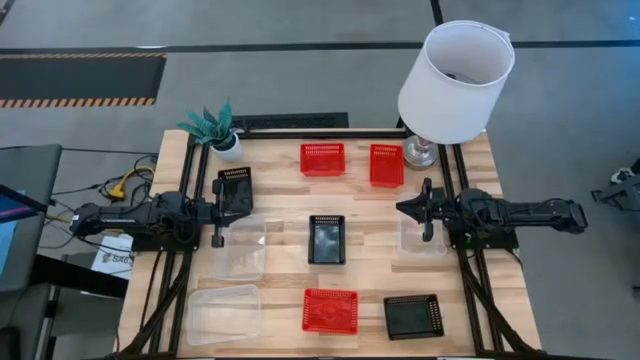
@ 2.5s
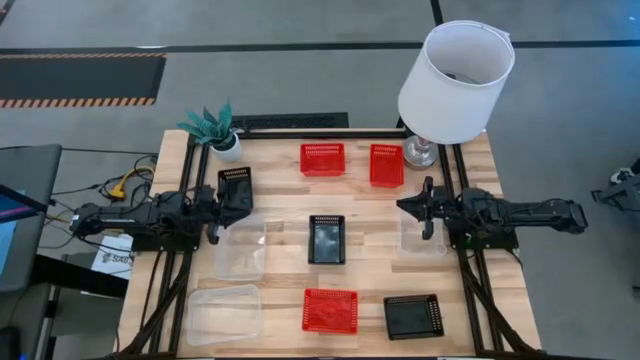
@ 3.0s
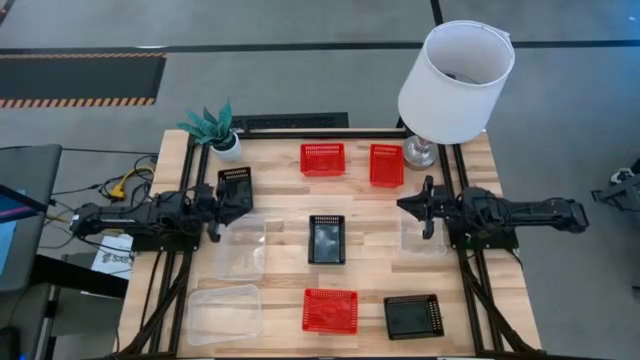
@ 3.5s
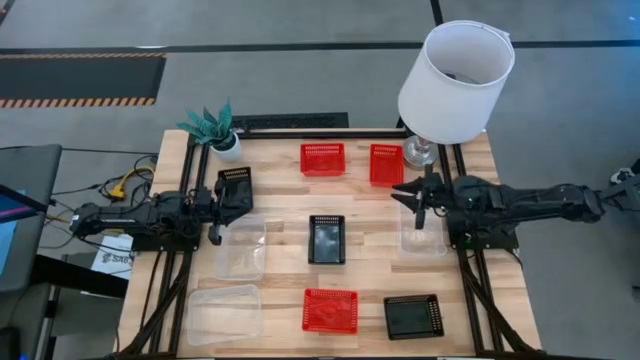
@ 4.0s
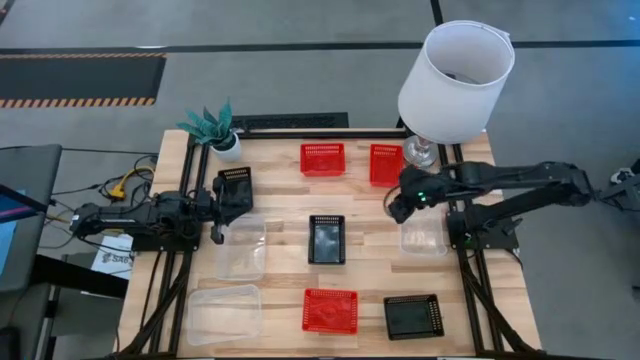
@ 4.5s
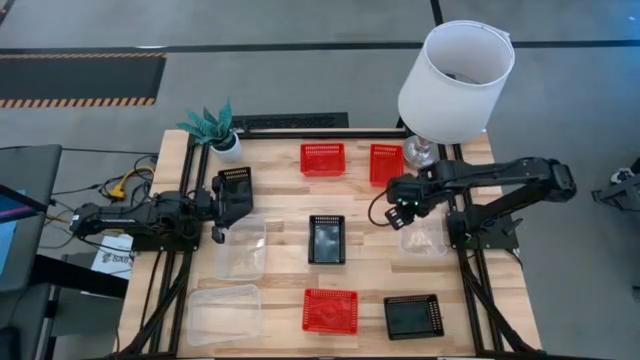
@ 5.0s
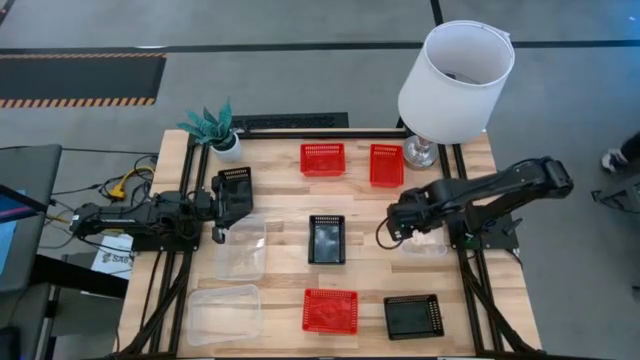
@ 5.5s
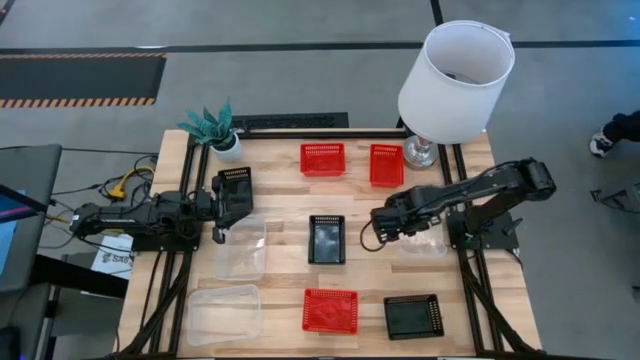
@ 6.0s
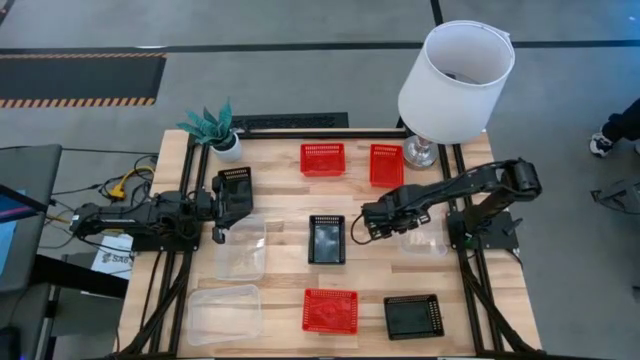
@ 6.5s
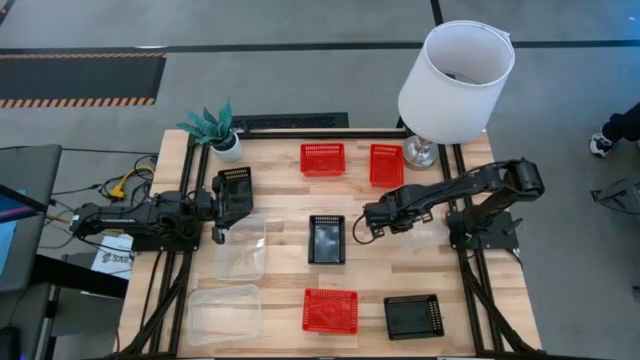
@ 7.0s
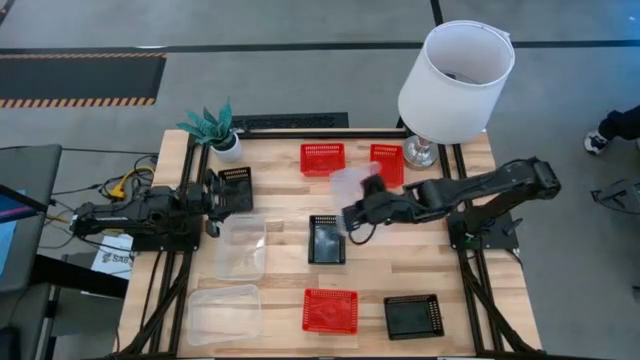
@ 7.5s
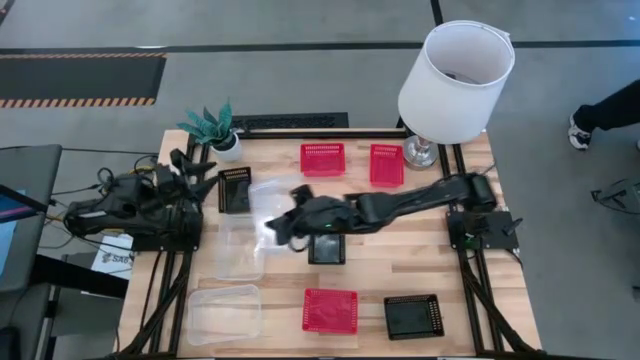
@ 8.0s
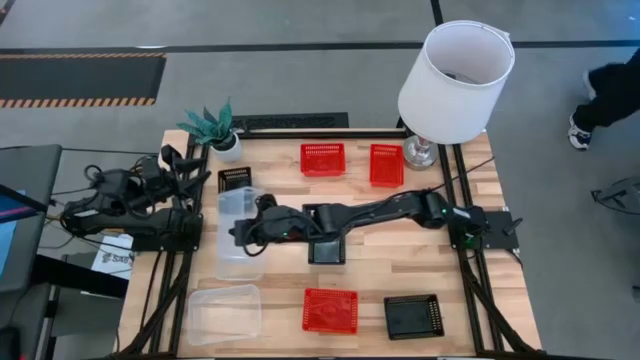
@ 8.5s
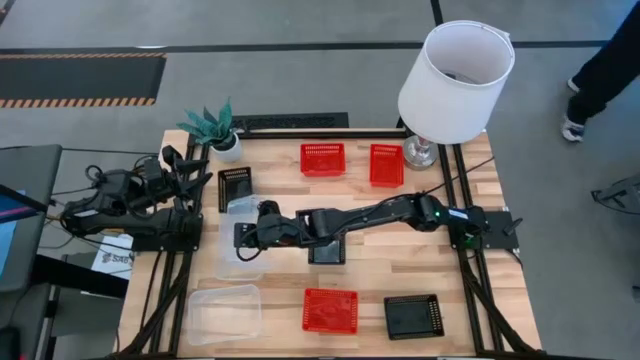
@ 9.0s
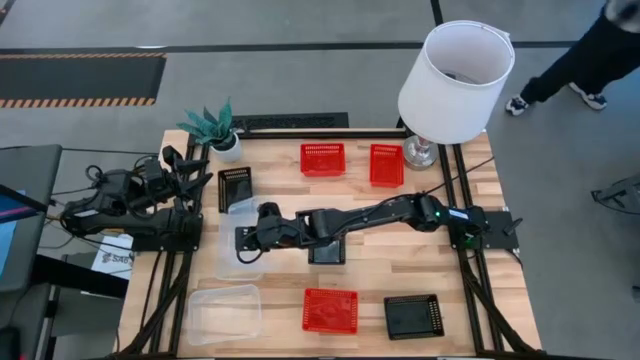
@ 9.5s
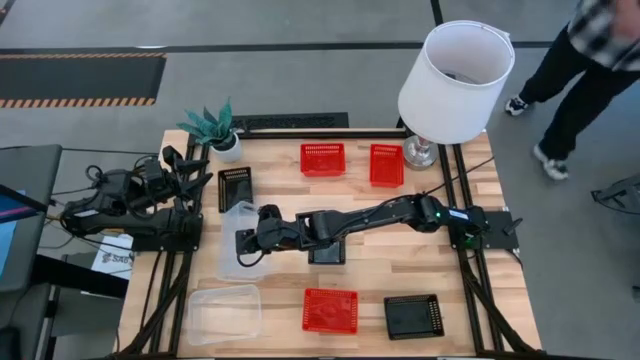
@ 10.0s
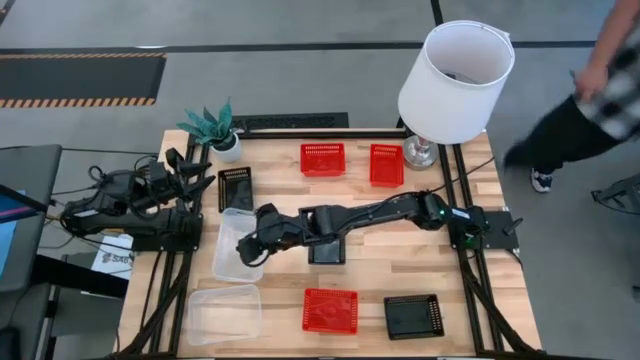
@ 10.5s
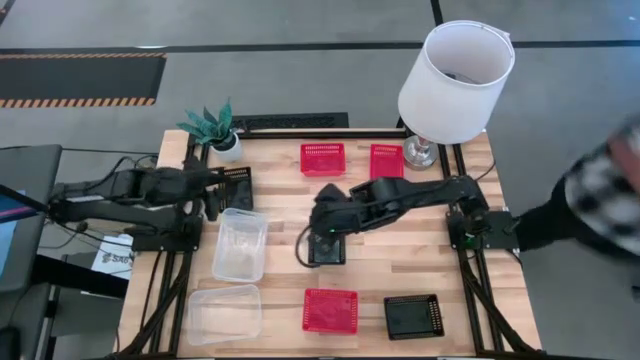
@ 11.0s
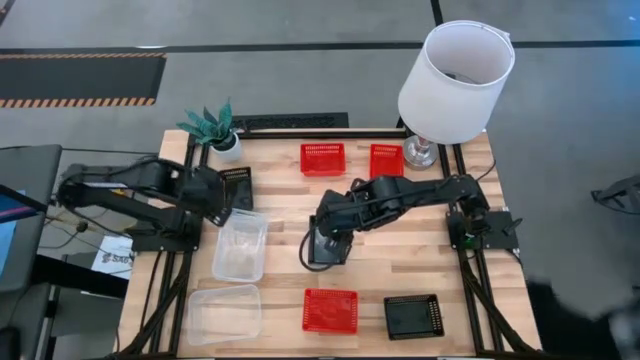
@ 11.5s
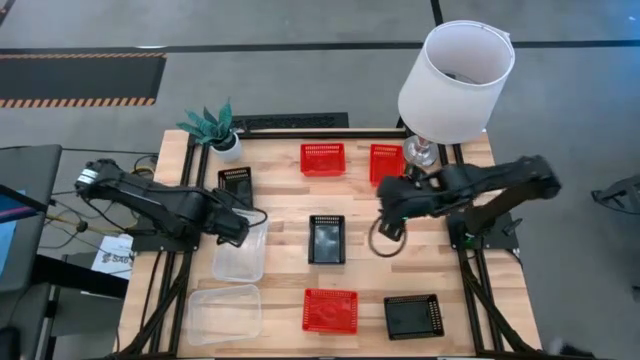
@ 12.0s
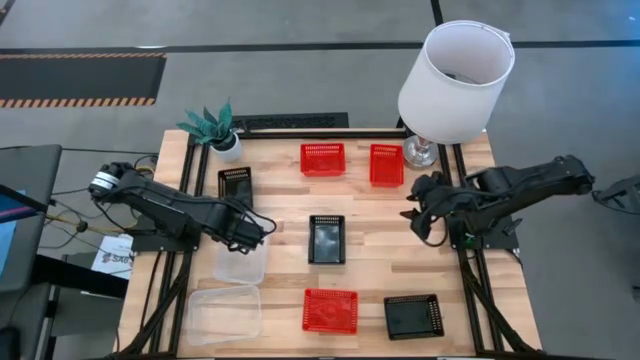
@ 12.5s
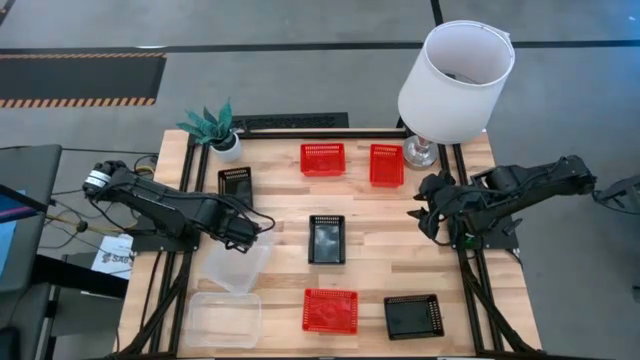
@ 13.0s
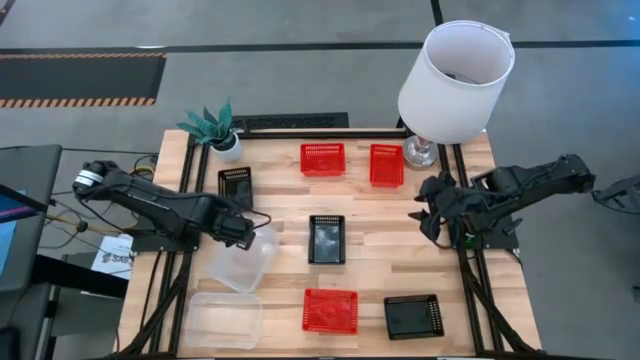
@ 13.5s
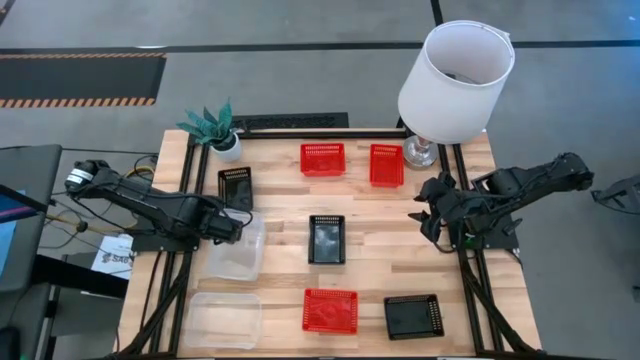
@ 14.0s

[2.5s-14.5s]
Stack the top right transparent bin on the top left transparent bin
